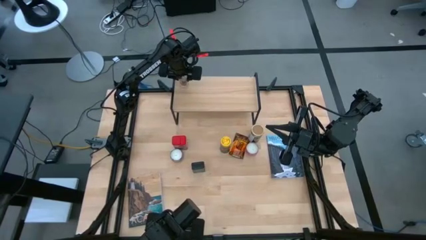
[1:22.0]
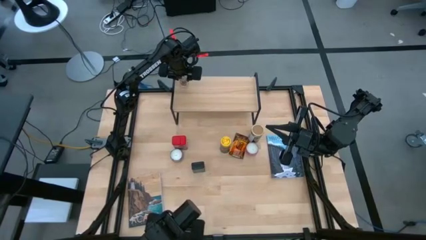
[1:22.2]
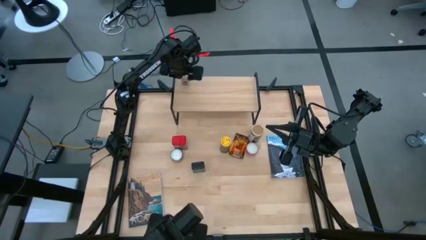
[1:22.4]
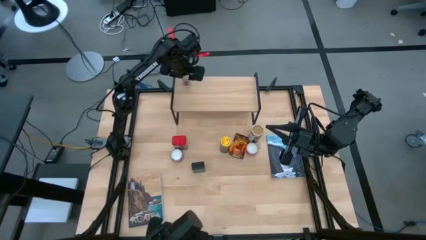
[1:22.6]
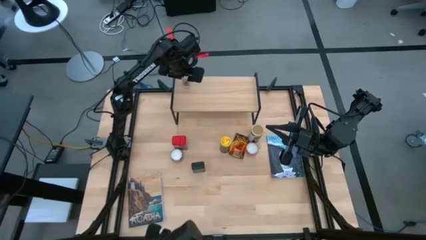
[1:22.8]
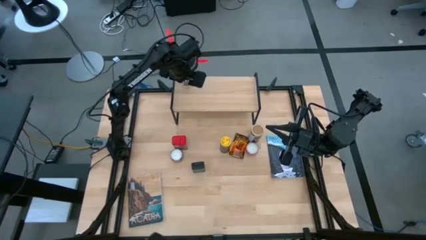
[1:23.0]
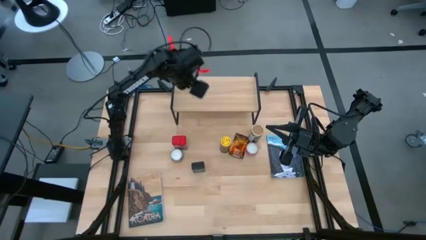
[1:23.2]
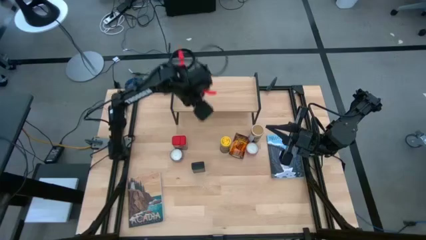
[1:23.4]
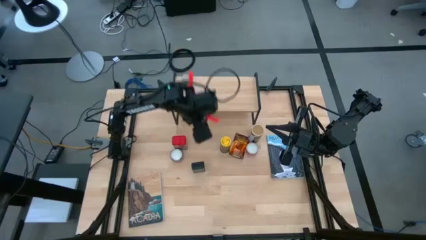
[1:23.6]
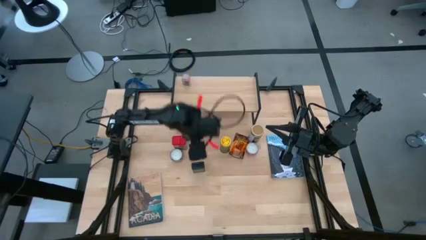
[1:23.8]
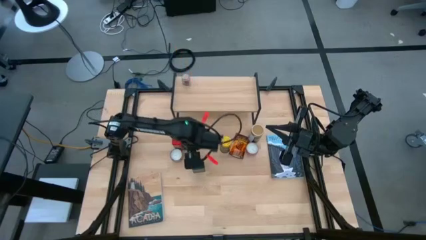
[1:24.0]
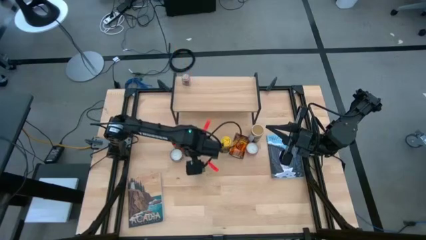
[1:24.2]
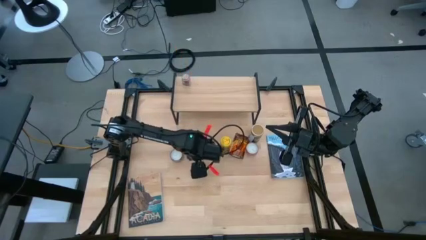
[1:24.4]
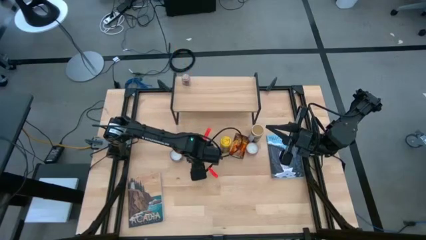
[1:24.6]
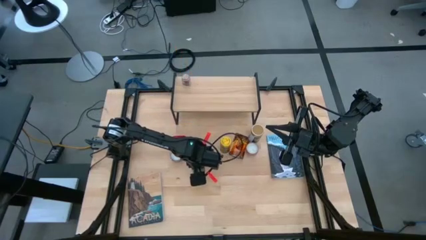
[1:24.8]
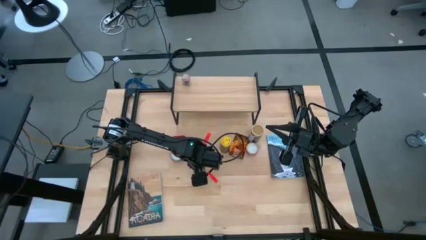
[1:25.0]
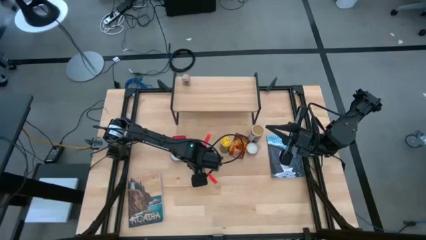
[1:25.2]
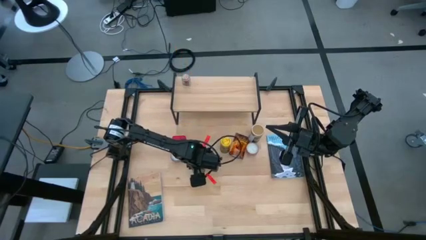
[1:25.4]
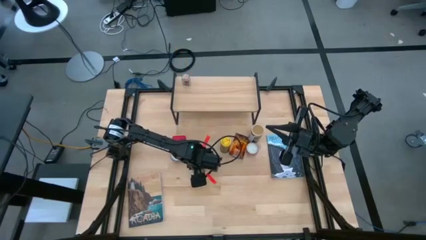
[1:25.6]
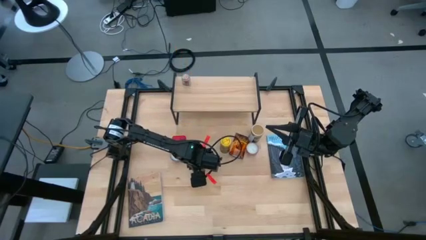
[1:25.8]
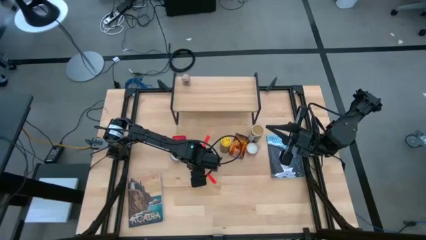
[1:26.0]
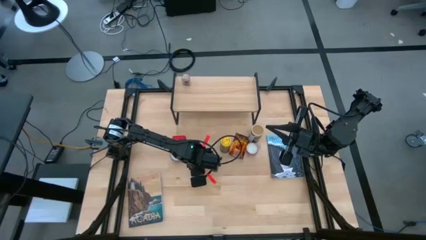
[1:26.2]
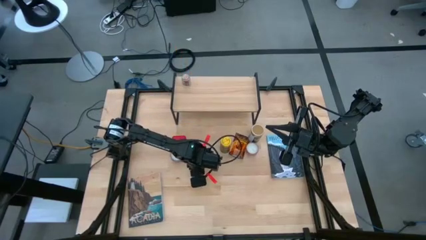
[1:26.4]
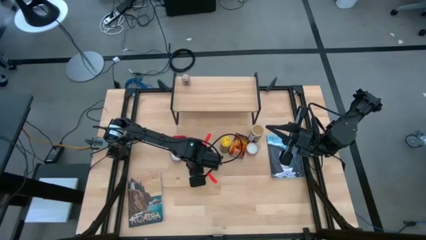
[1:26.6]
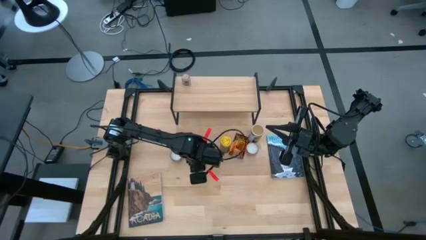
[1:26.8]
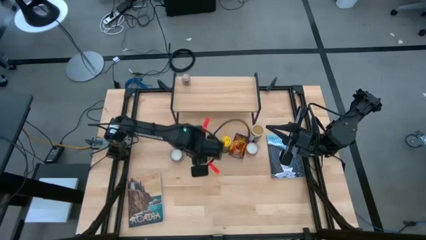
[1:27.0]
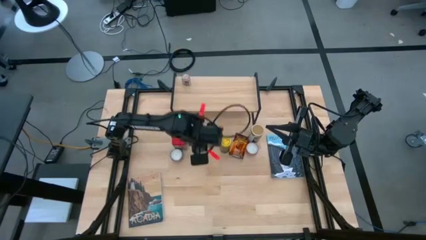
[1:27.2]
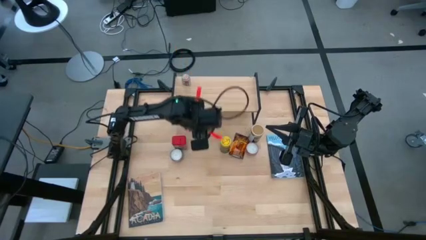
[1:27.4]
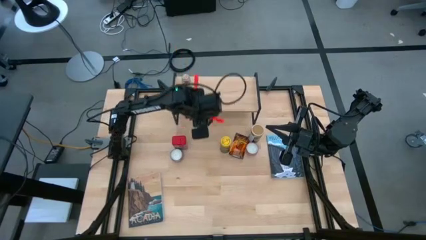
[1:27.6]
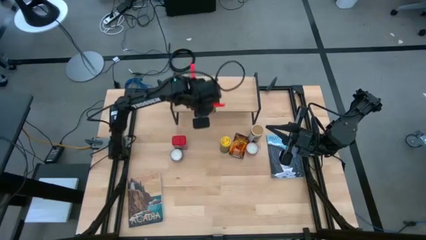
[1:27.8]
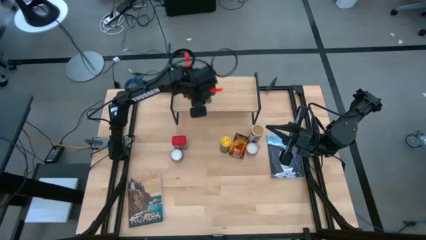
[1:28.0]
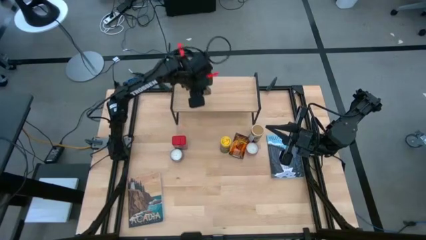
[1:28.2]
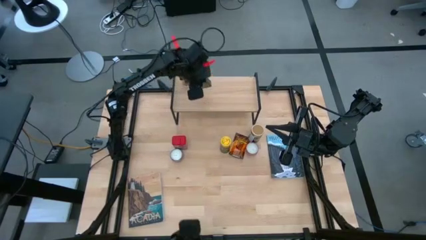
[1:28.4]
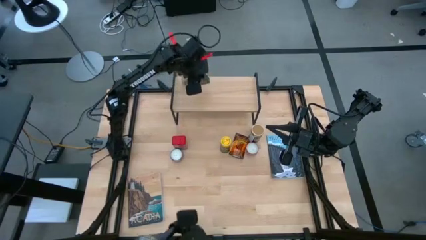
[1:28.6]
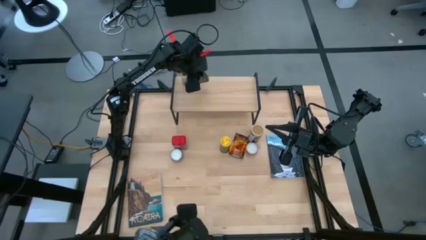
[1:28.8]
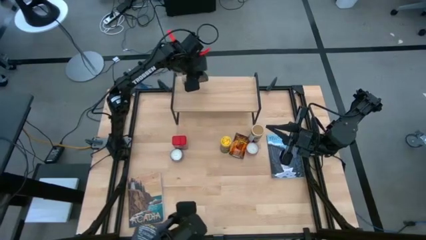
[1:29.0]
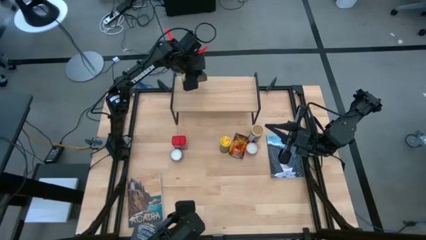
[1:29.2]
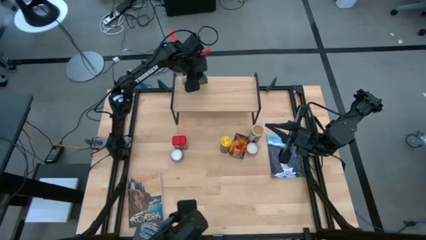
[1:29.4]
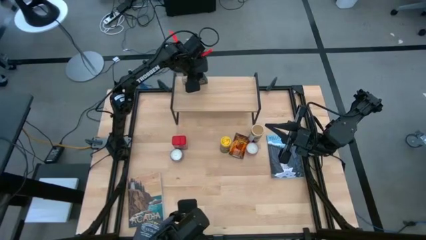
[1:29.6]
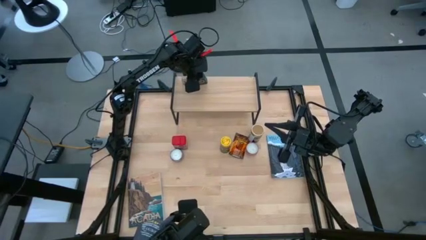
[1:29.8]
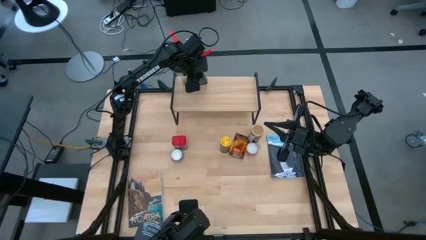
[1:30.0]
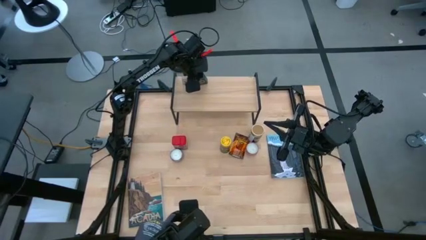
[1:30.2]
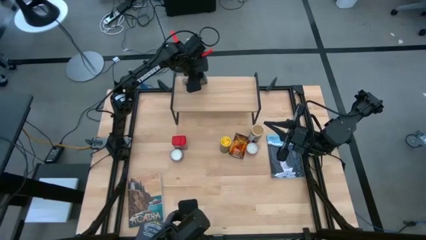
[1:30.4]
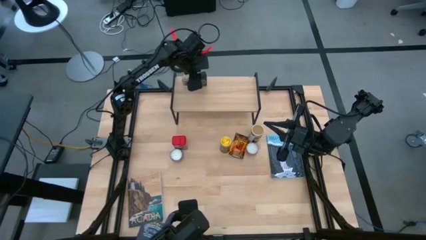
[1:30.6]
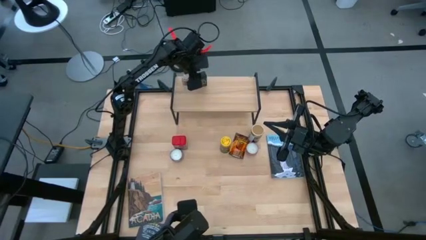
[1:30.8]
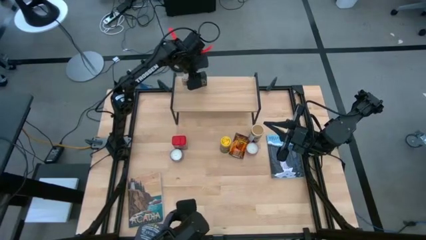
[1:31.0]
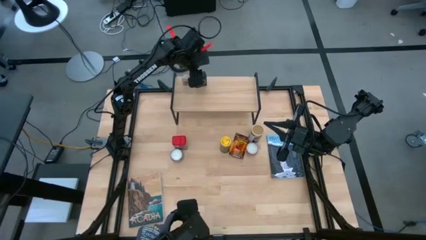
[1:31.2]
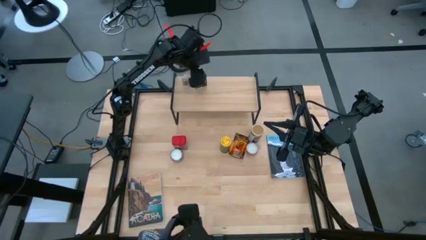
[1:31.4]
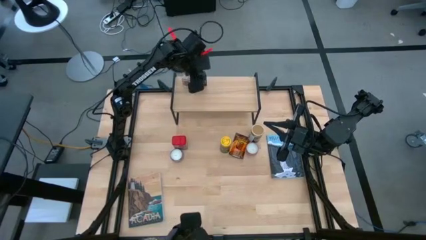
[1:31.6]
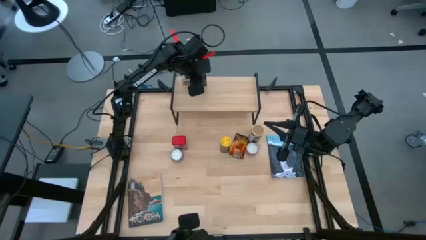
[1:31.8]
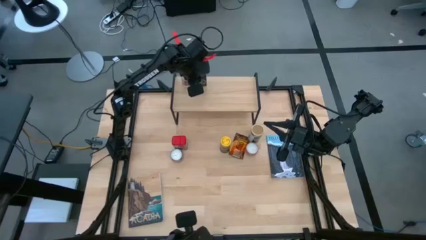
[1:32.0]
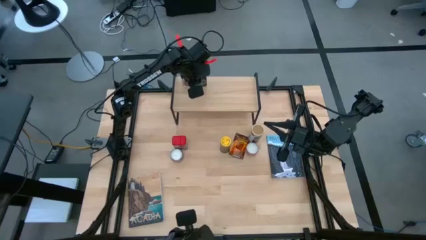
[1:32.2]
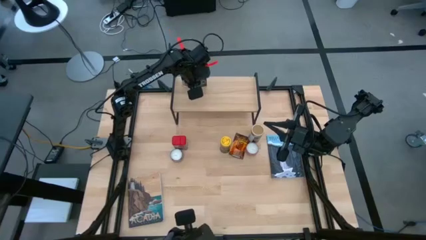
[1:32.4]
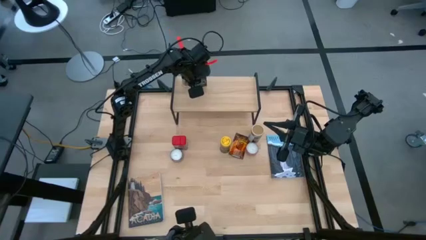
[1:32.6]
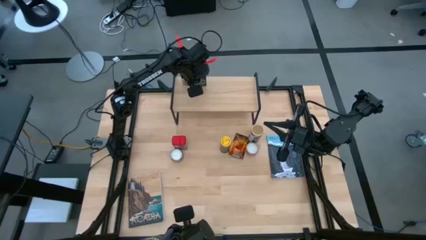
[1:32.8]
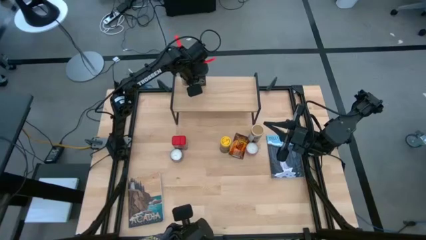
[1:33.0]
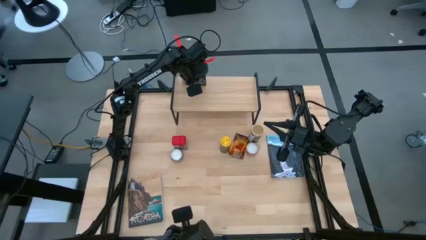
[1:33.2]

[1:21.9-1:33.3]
Task: Shelf spices
Put the black seasoning can on the shelf

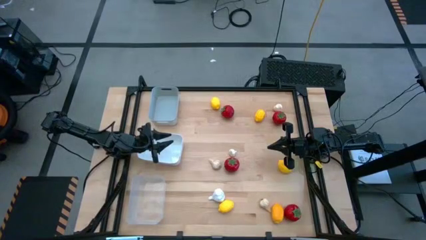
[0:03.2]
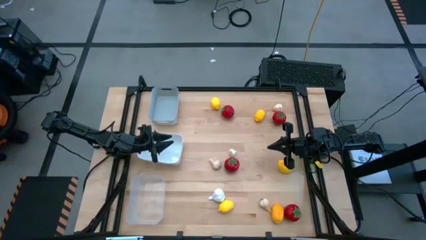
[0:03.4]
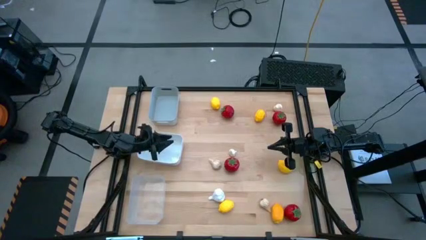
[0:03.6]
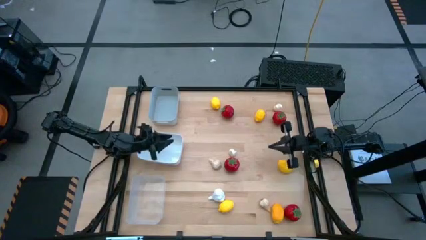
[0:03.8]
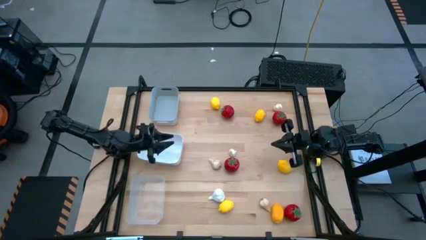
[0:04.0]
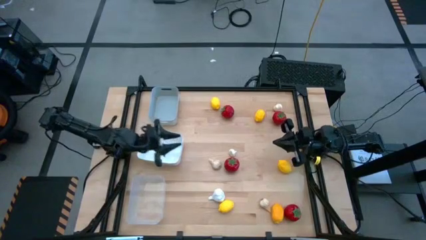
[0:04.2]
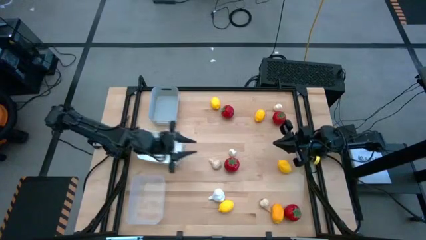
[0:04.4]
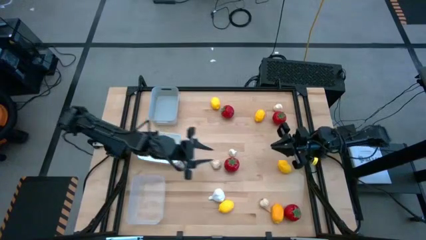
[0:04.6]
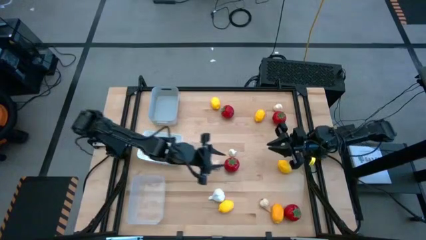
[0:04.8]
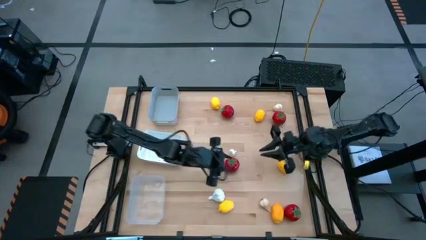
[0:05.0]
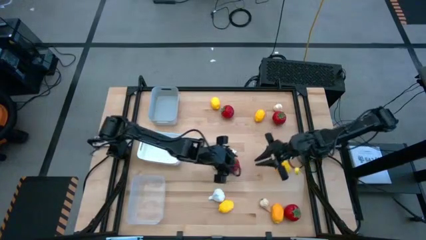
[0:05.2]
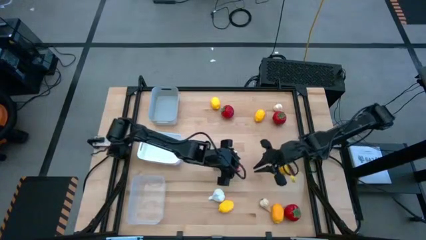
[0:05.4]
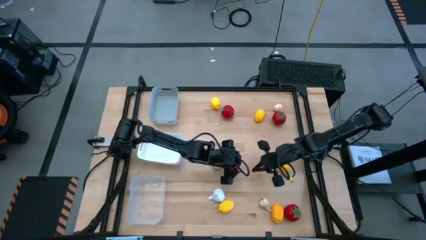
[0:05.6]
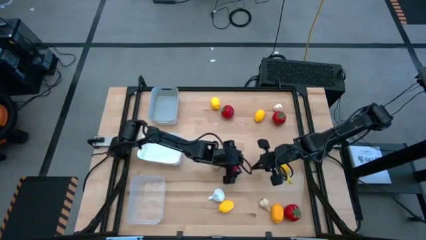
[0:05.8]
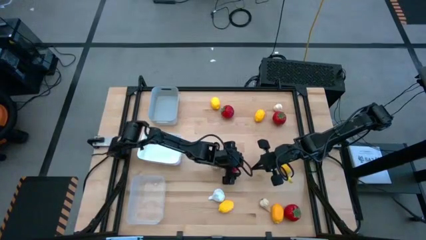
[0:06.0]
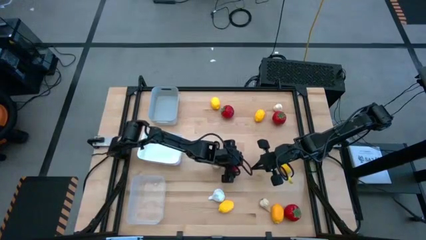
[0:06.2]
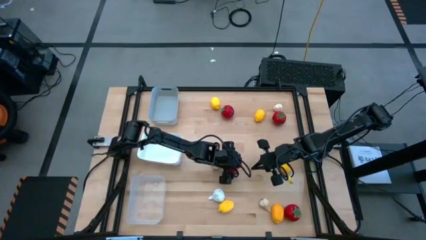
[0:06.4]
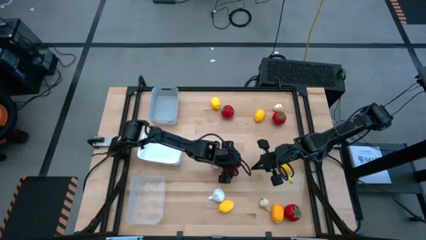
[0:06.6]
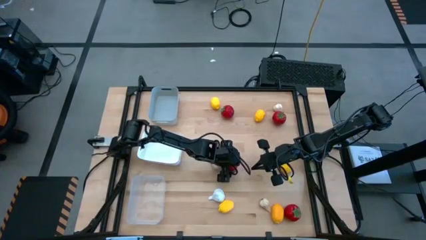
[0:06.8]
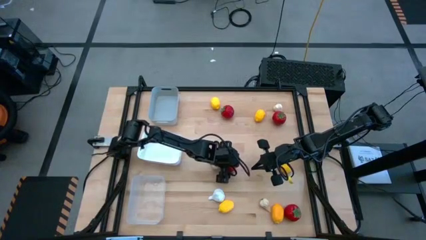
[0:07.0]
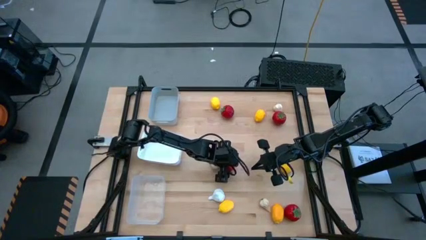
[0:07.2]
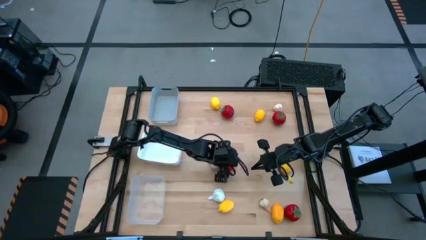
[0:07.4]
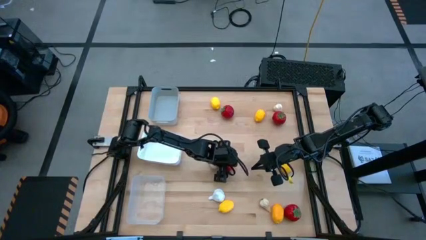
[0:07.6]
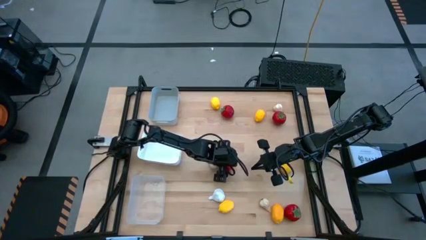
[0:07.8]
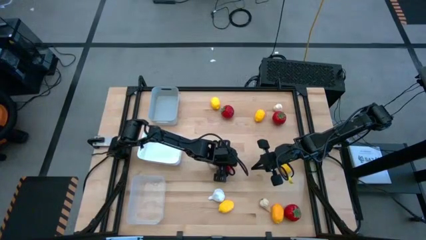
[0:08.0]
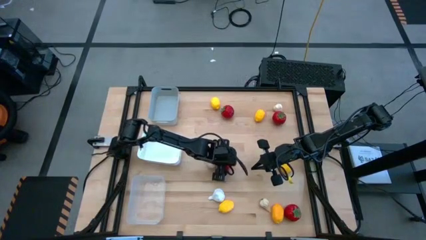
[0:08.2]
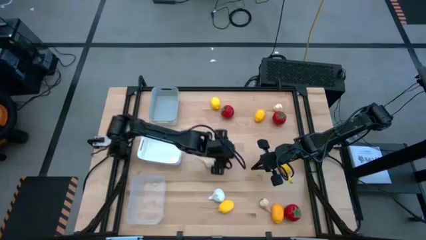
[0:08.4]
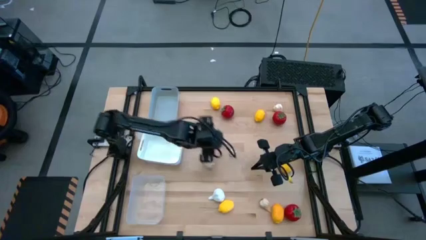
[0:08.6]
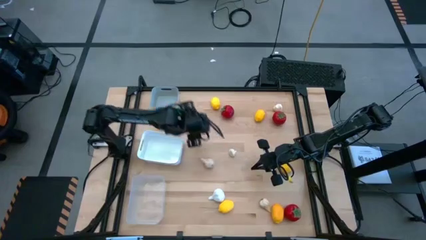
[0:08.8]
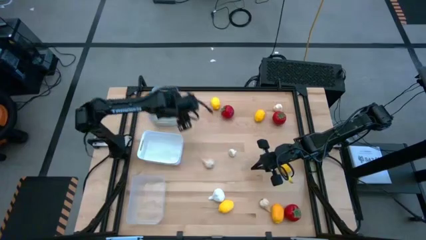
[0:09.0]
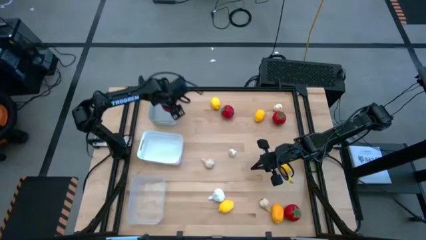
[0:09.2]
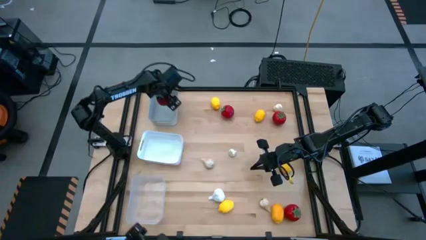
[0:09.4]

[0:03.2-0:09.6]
Task: Sort produce into baskets
Put the red tomato into the gray bin
